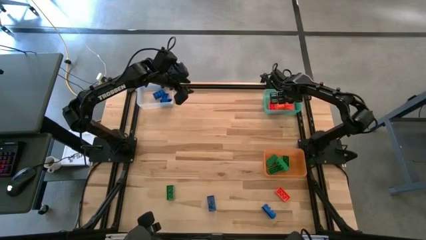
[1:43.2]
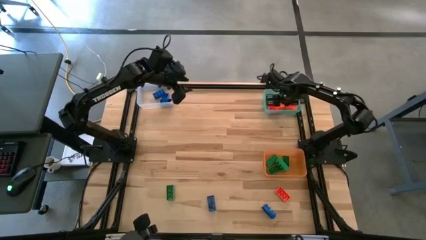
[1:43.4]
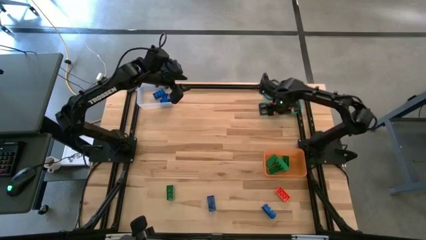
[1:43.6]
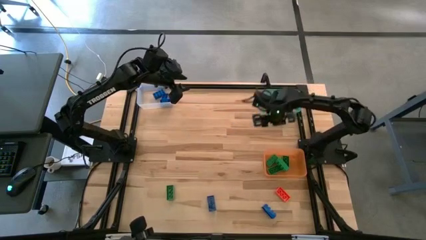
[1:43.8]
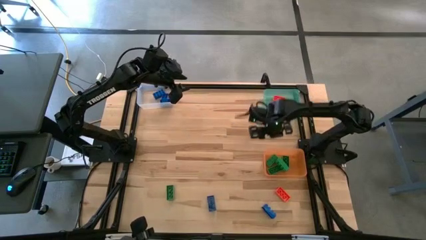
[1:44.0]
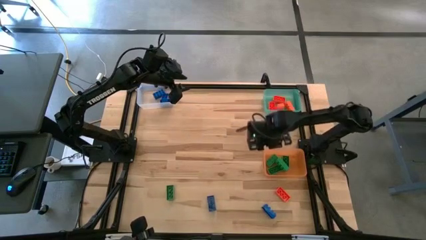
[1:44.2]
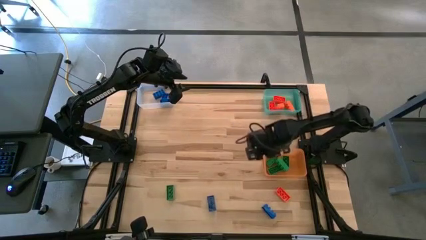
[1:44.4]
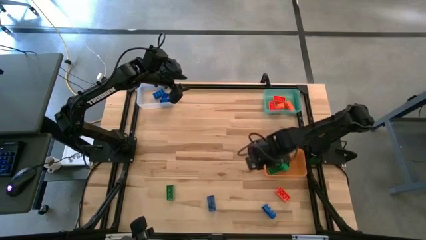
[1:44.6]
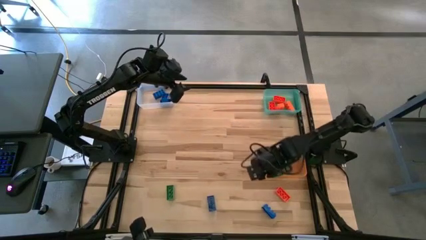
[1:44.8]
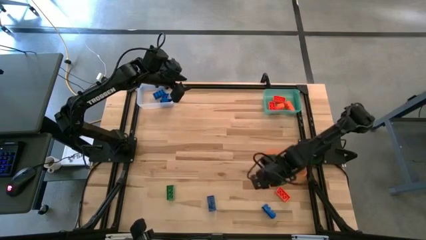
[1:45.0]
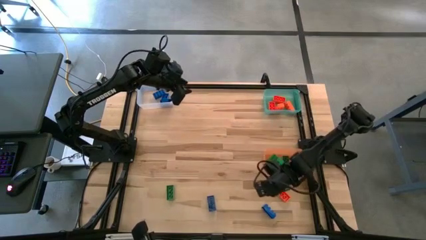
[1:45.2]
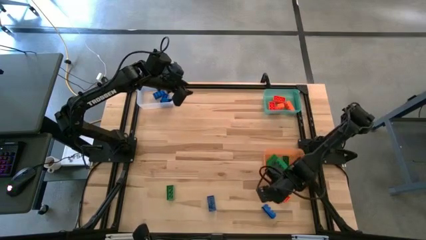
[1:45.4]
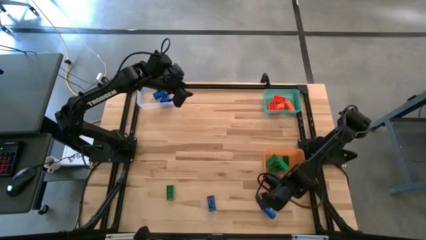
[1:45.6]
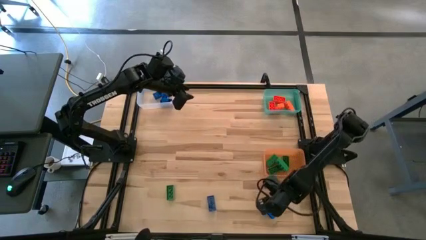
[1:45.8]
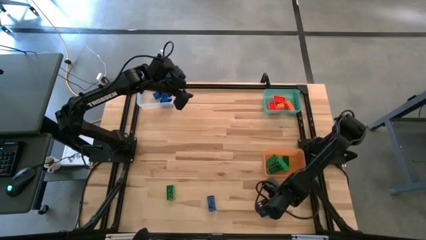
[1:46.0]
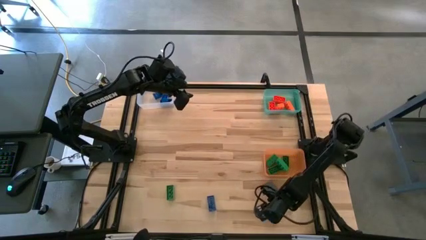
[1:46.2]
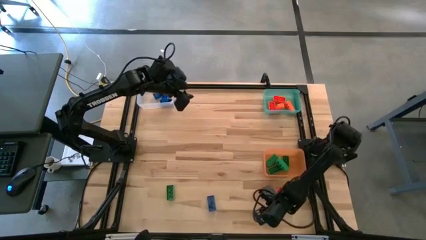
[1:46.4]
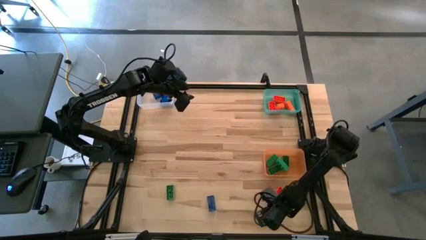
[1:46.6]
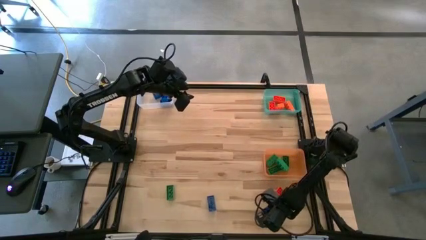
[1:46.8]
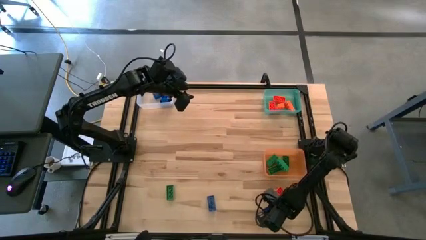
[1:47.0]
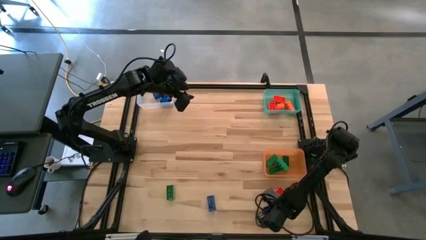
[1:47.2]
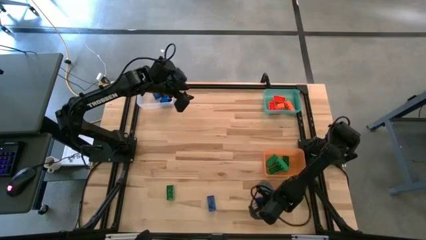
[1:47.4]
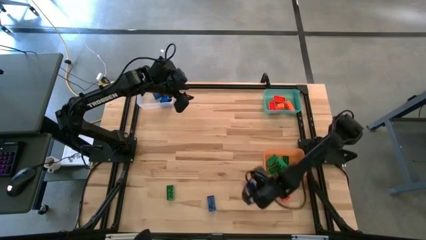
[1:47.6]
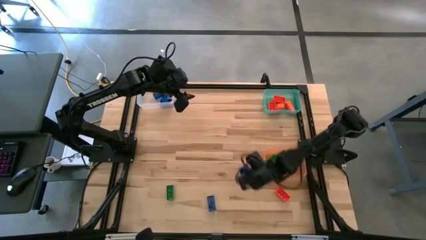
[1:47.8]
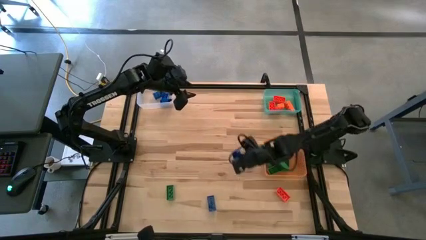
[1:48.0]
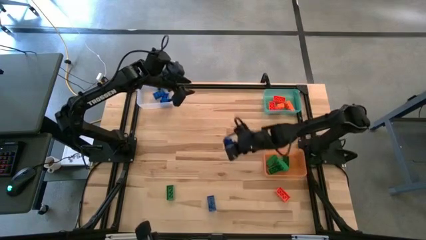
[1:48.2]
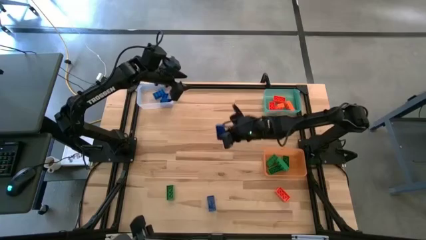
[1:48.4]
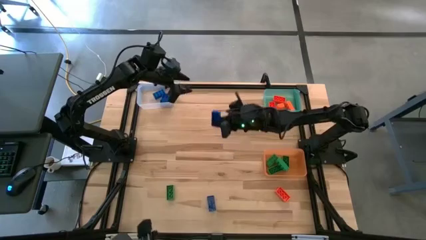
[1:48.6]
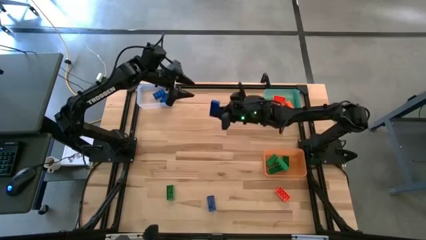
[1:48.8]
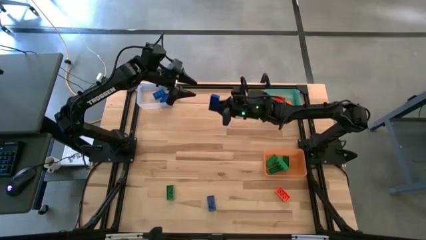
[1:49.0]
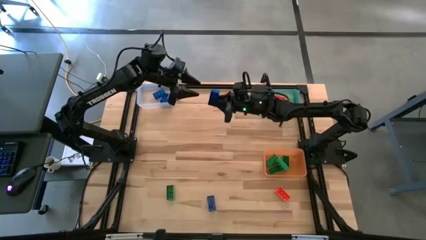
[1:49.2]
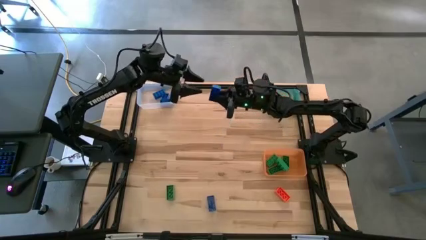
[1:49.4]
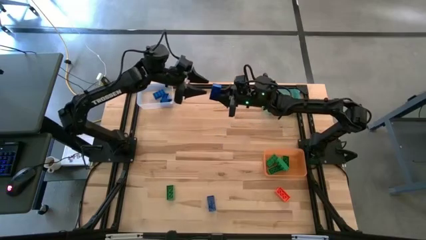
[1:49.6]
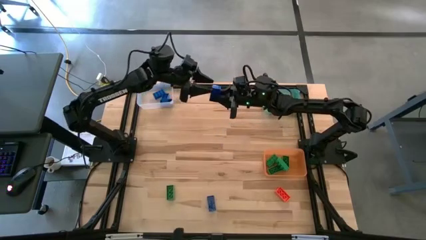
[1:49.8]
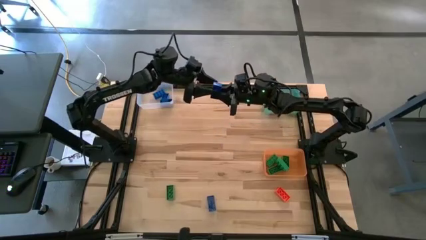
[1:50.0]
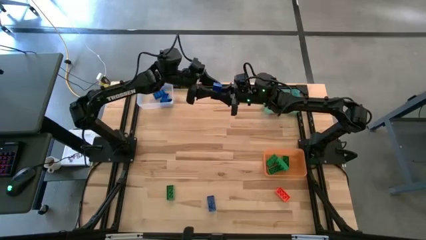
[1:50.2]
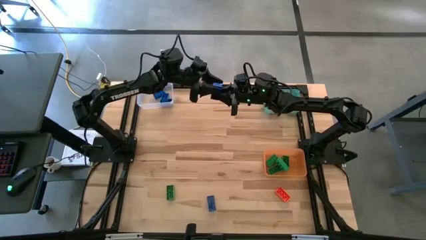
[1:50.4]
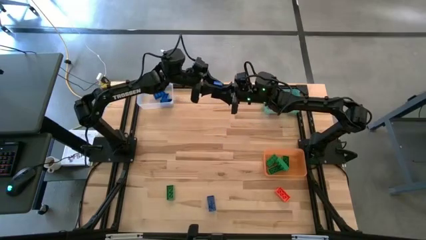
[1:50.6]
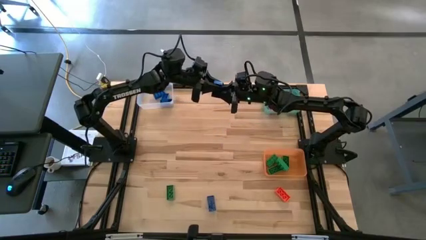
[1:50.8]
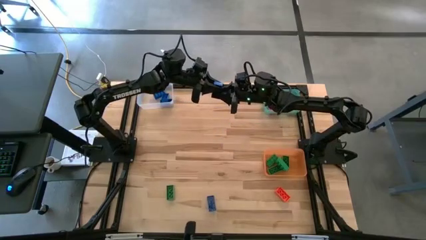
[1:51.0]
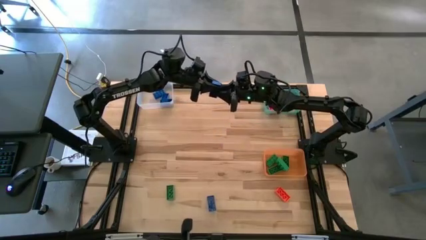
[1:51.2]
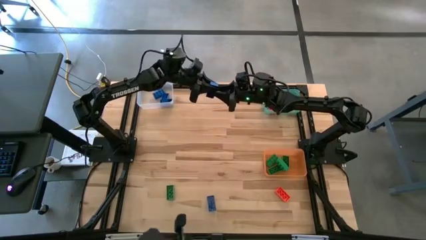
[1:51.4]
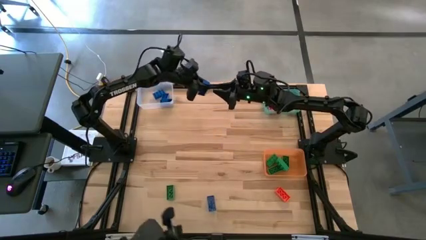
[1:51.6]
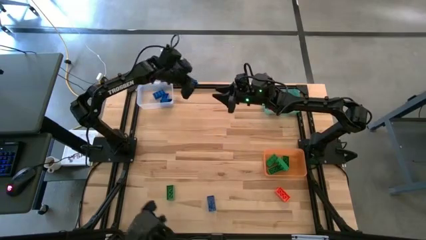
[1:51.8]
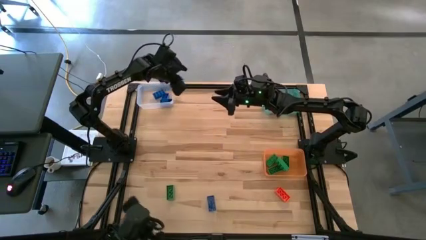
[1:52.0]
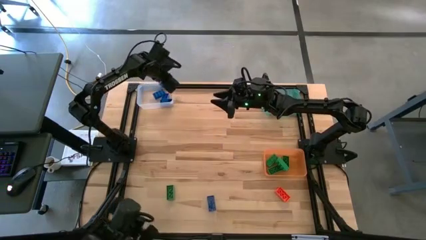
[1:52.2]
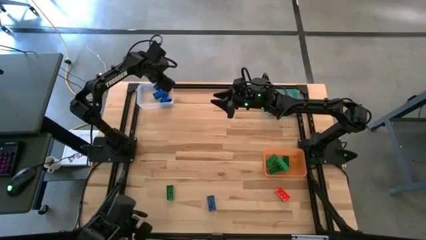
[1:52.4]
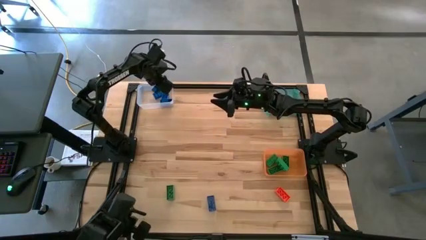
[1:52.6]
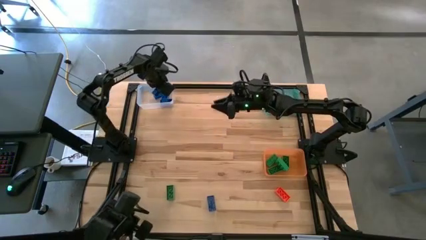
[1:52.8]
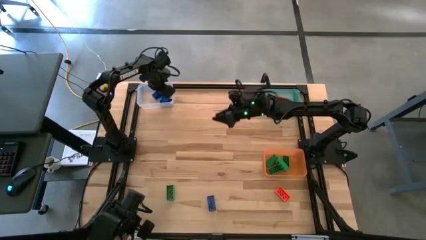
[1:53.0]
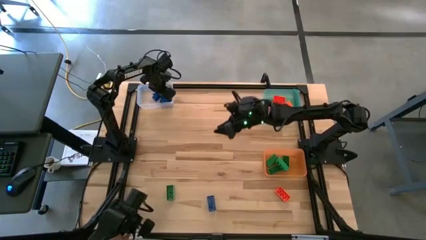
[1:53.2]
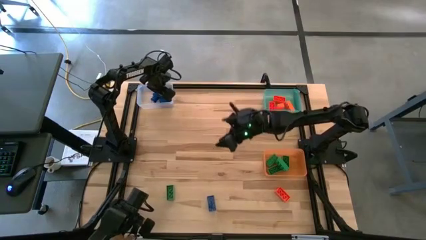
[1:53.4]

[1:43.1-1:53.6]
Task: Sort & place blocks by color
Put the blue game piece into the transparent bin

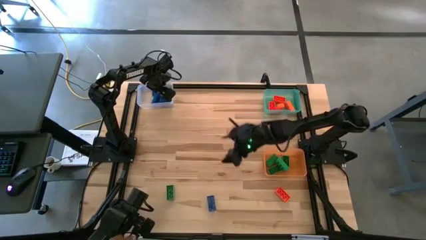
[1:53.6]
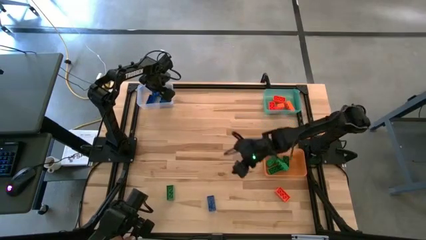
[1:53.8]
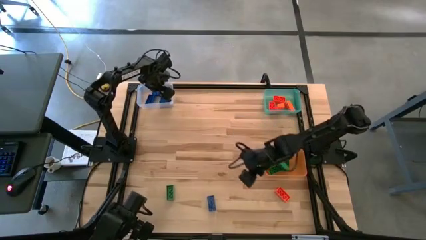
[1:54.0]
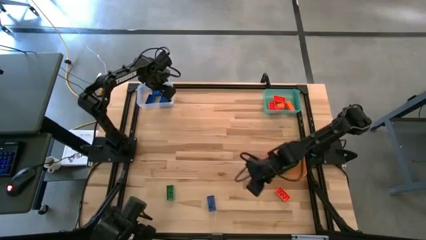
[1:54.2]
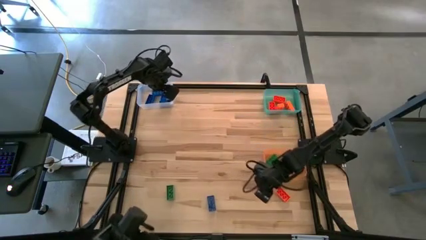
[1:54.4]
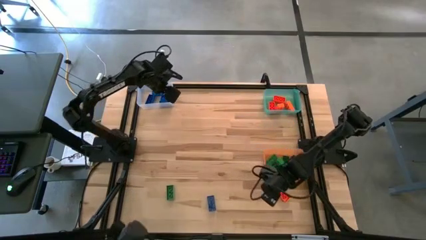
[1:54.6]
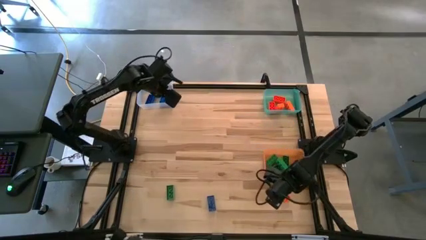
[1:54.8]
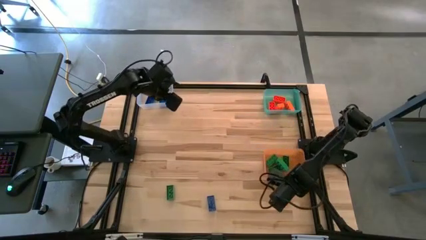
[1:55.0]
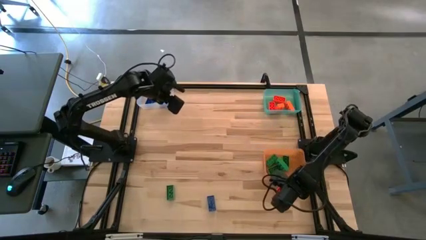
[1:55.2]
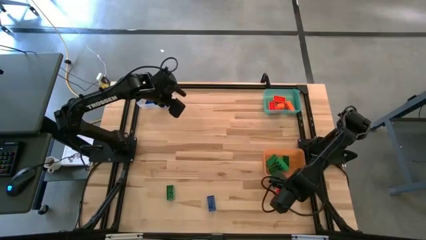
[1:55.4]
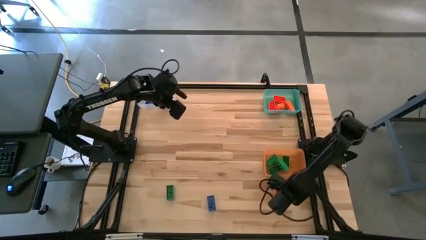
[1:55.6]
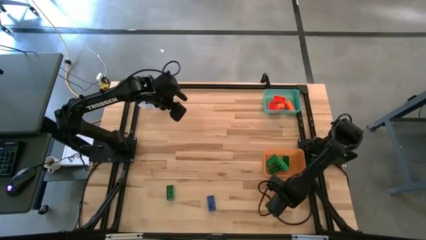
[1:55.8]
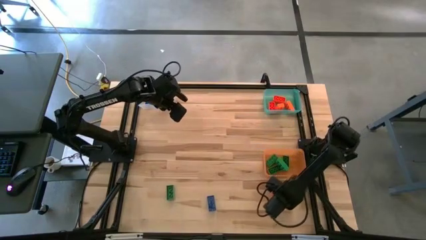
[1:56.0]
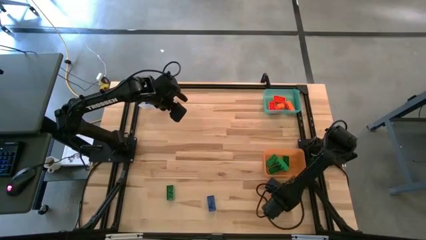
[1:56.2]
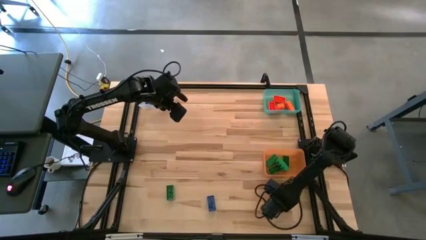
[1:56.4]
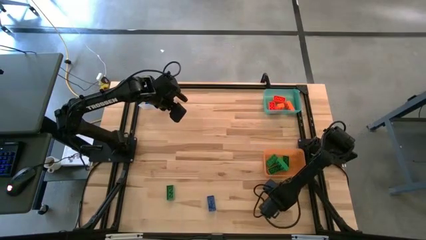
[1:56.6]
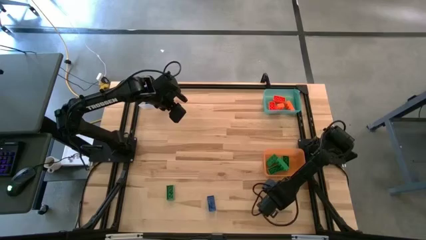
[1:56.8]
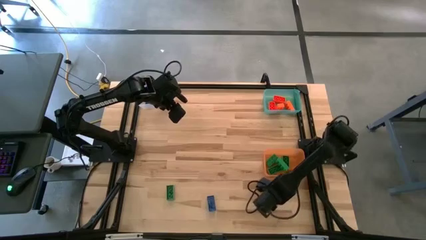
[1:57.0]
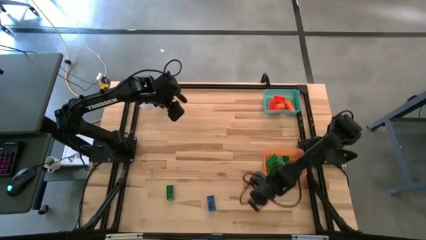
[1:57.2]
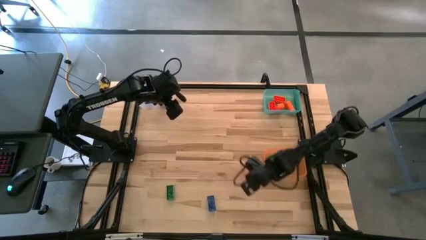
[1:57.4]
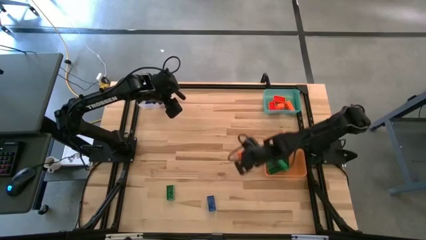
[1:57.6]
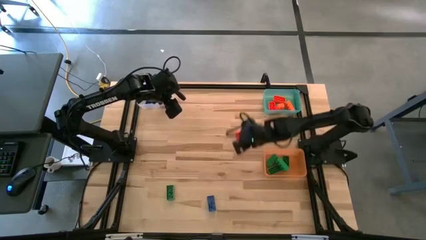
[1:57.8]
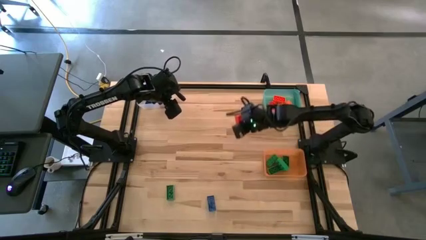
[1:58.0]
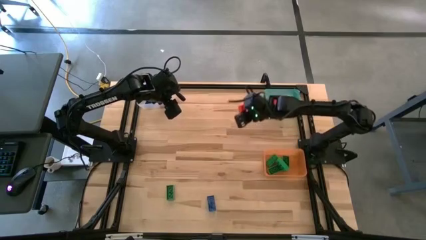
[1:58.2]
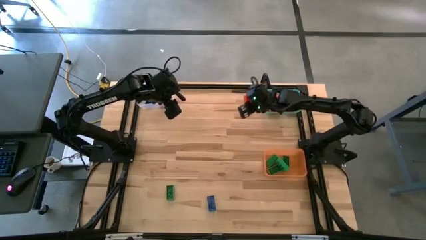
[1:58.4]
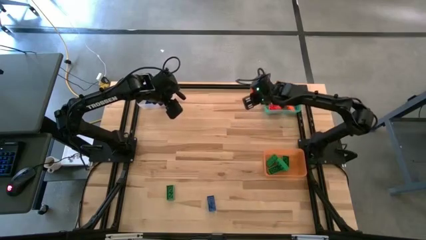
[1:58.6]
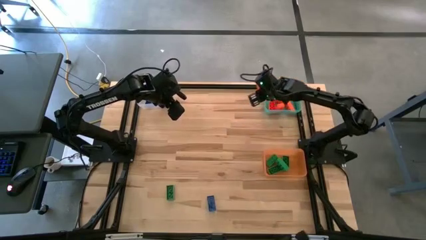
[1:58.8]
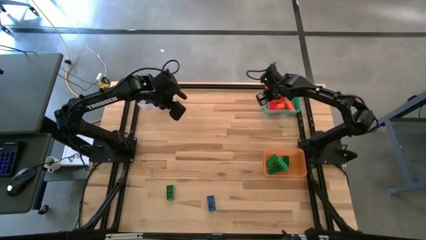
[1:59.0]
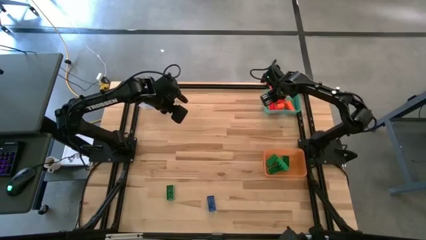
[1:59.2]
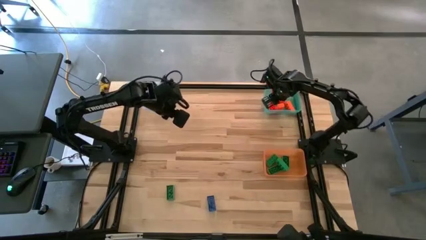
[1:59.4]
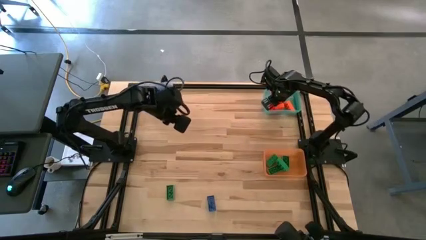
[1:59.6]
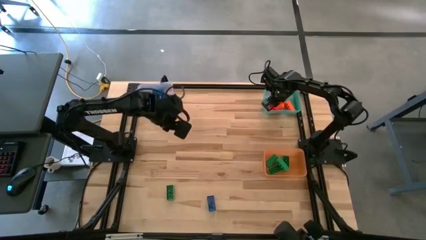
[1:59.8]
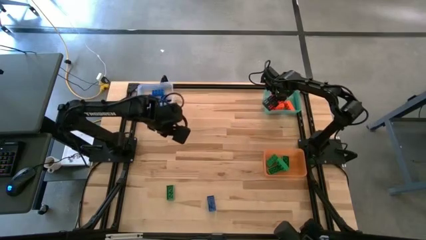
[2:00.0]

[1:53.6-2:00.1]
Put the orange game piece into the green bin
